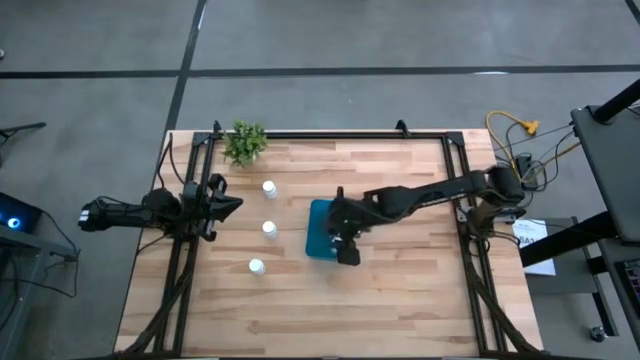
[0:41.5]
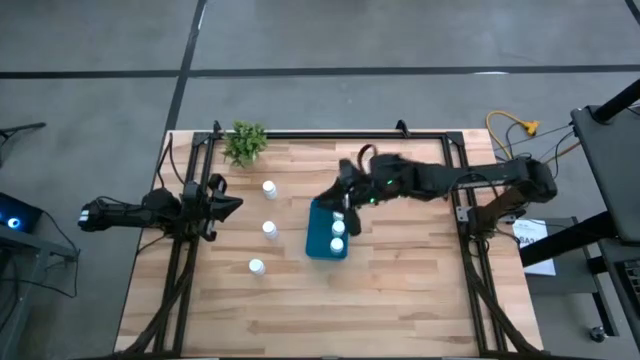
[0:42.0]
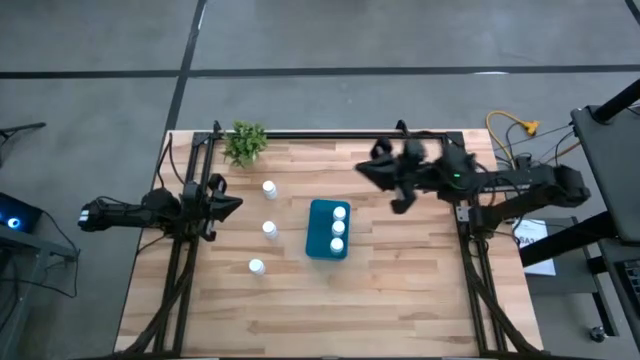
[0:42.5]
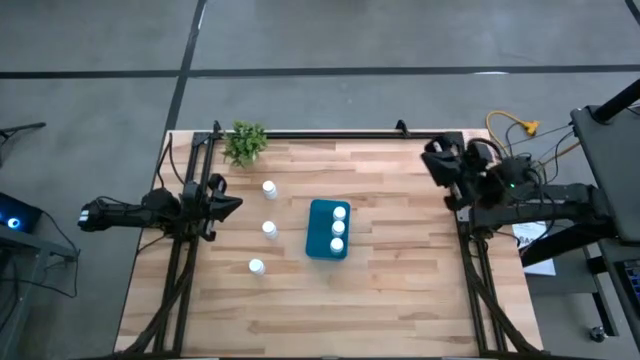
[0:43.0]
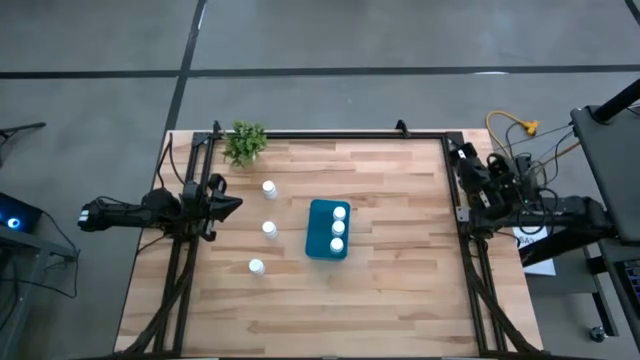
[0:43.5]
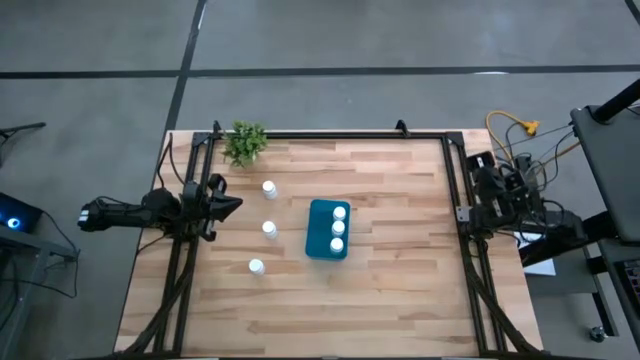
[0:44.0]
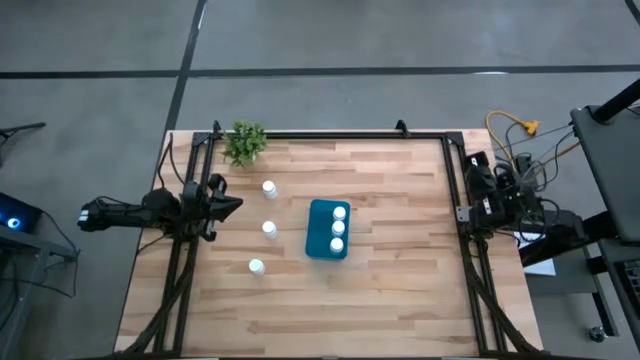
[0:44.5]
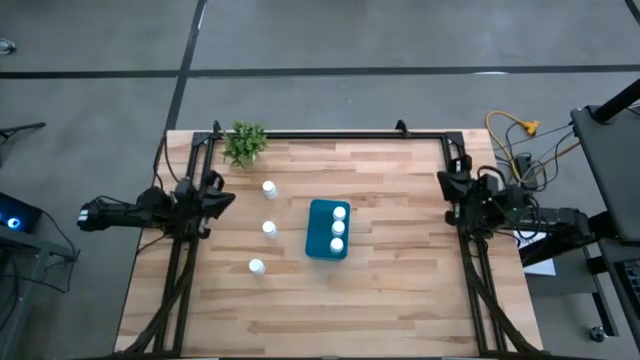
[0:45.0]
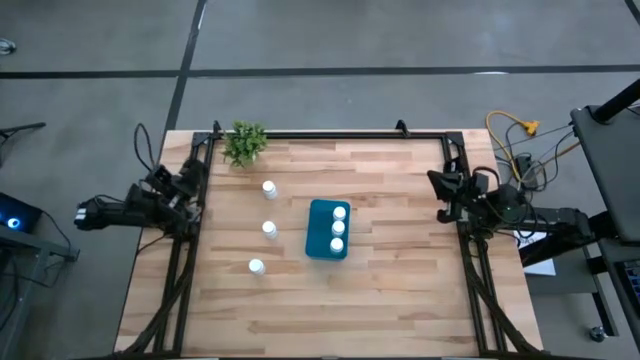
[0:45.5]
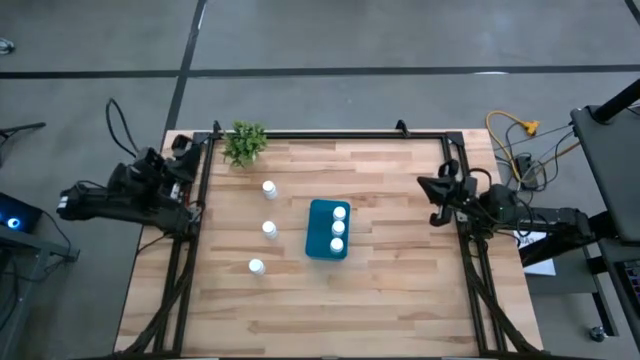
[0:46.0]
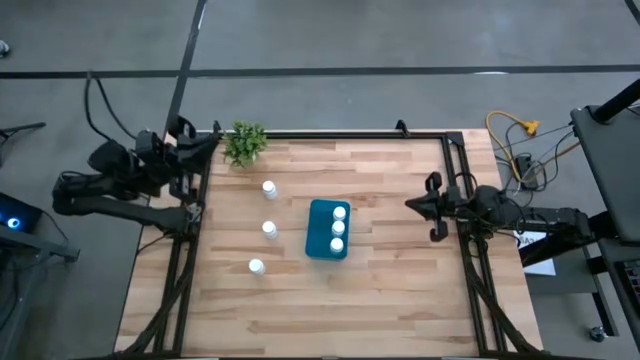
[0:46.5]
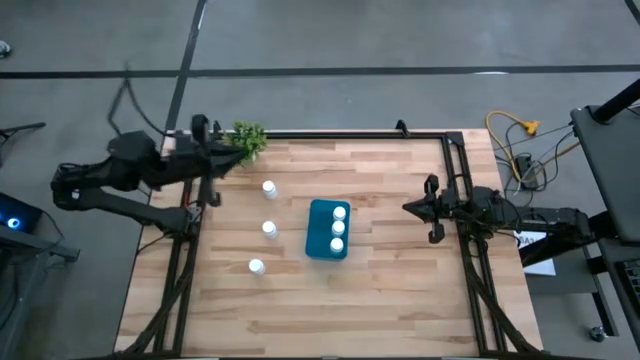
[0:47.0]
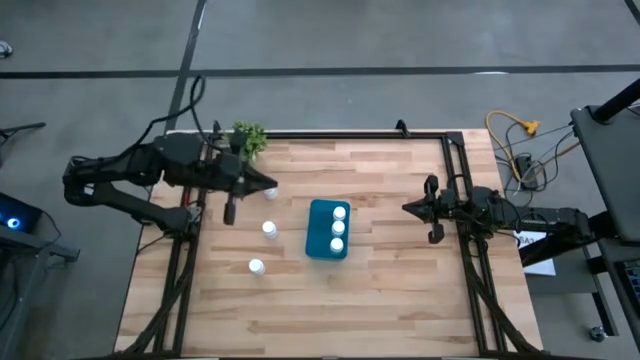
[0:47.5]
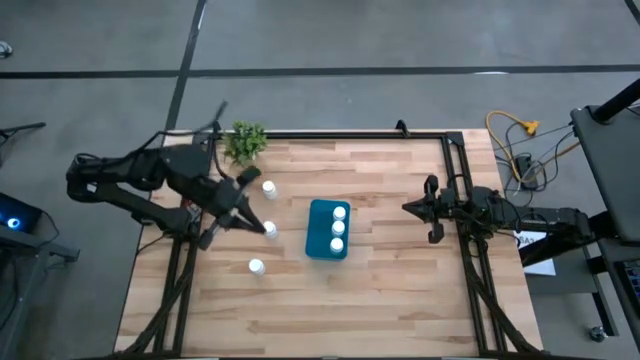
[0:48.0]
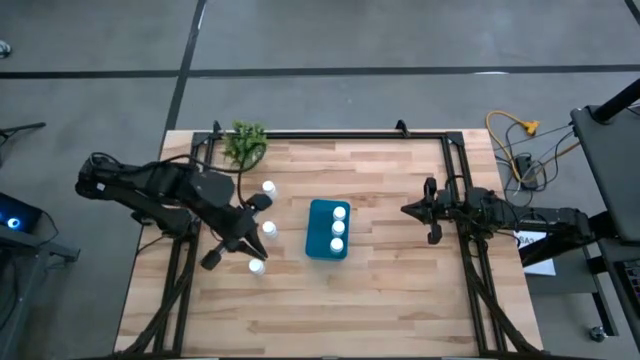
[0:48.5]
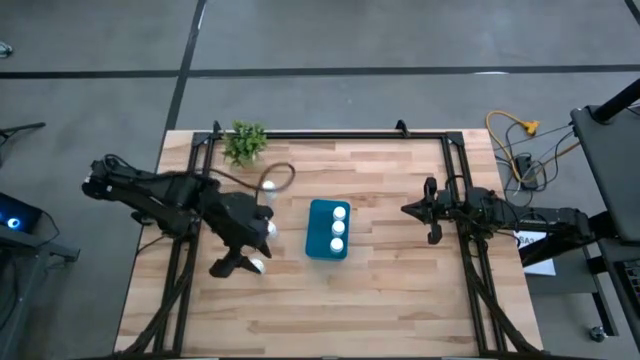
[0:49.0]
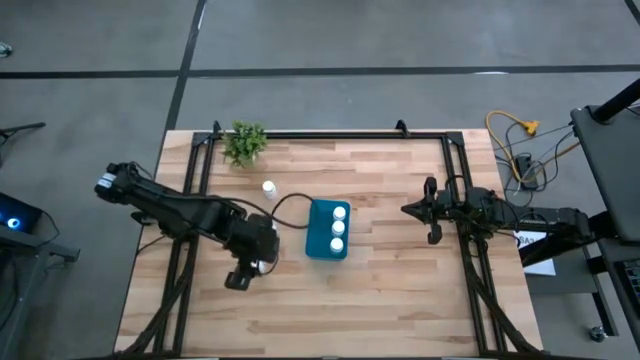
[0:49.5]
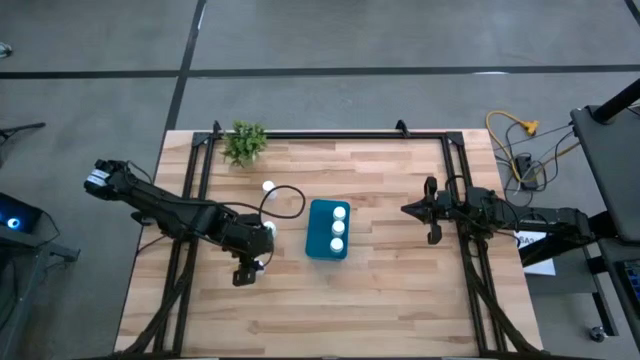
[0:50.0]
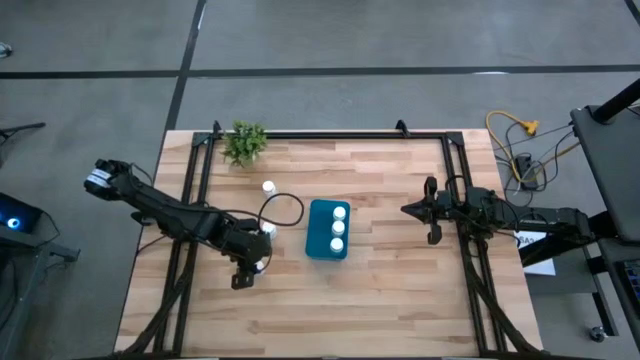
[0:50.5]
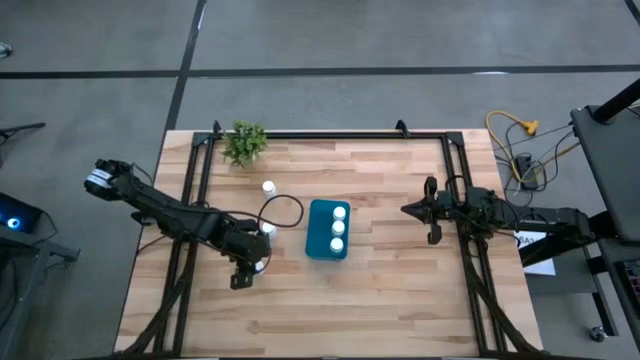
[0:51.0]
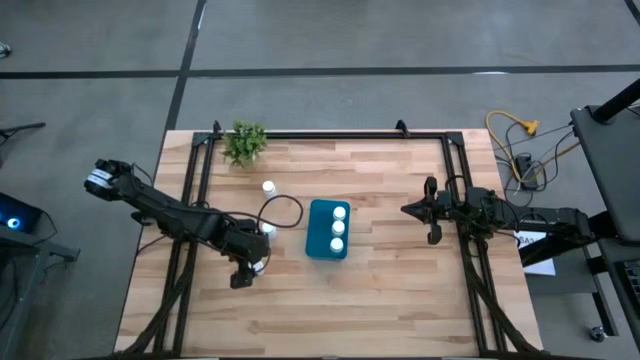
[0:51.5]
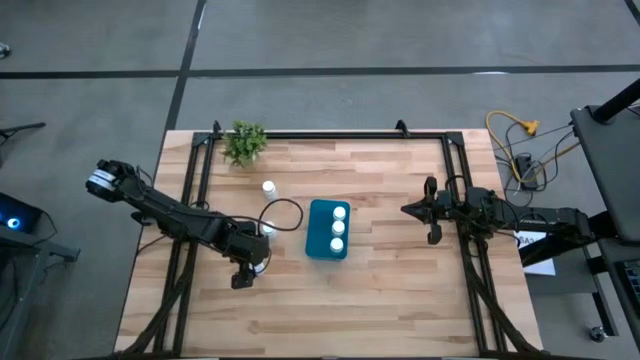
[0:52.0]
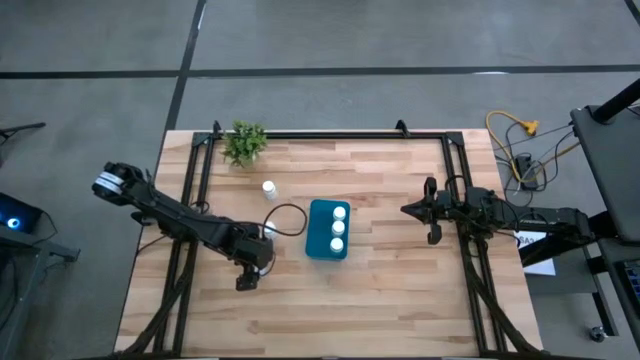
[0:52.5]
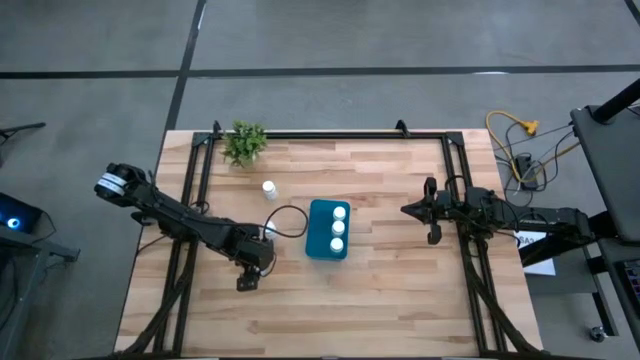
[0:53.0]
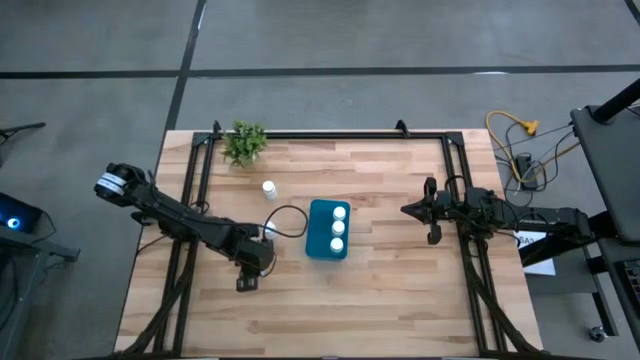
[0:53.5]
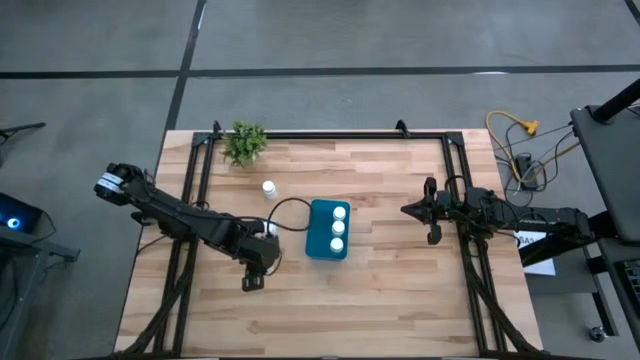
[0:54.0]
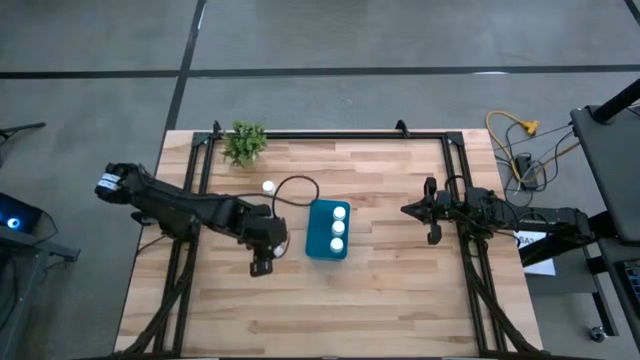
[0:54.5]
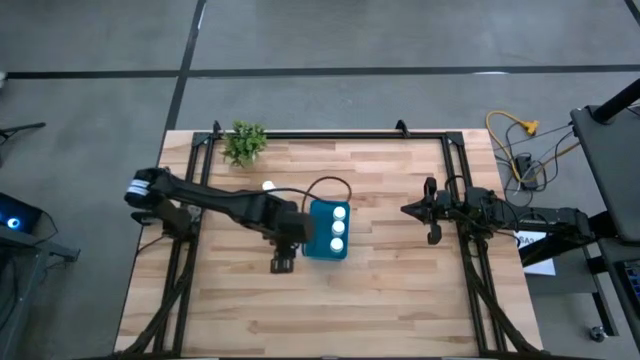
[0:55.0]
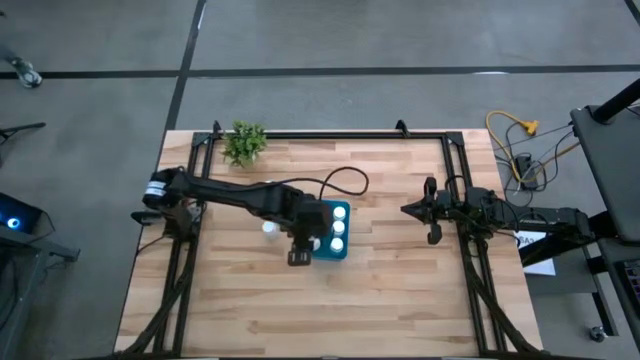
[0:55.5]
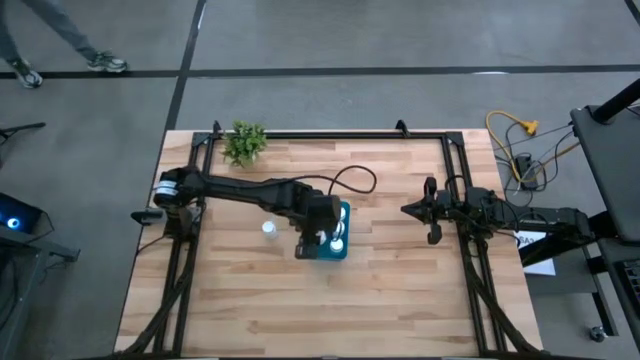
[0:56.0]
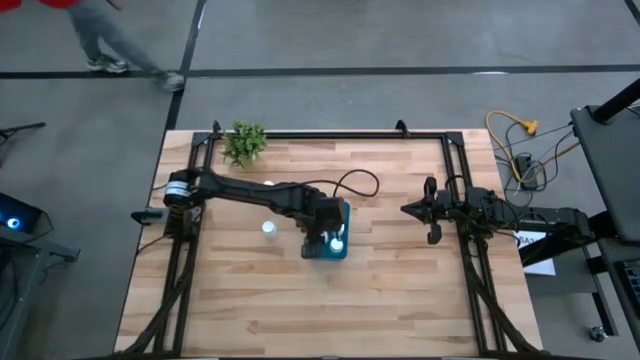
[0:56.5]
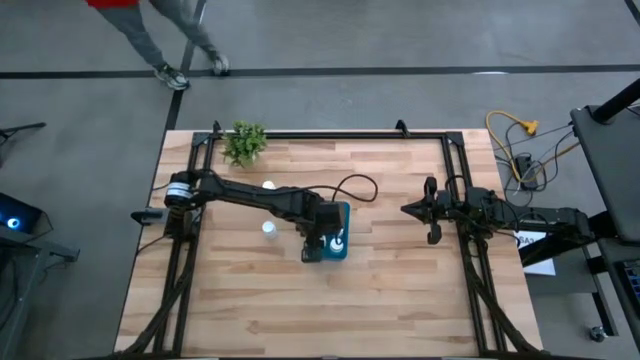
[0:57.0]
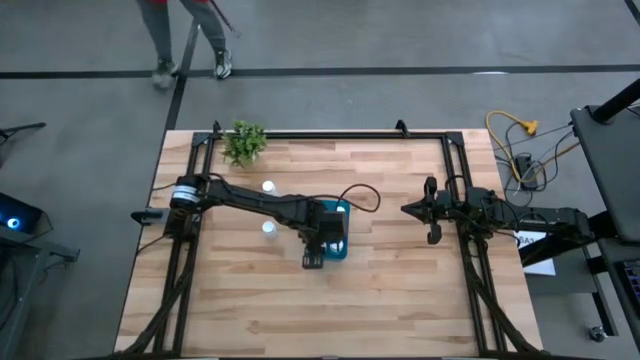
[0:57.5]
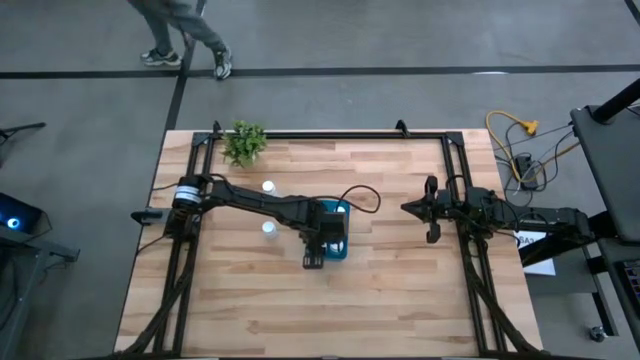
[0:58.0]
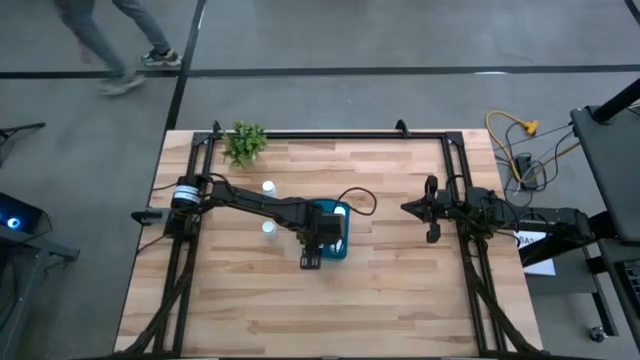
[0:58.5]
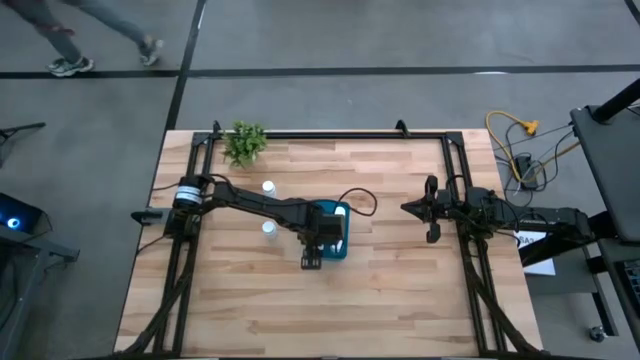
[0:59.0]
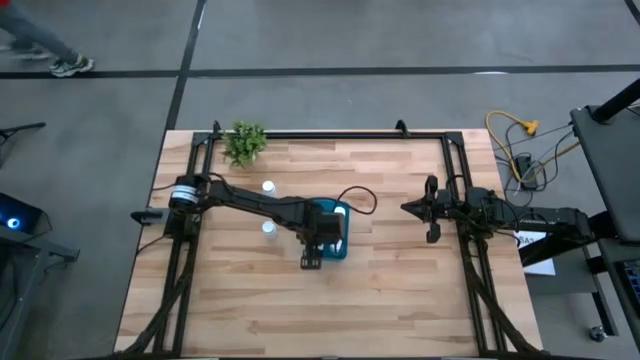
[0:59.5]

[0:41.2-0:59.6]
Task: Pick and place pill bottles into a basket
Put the white pill bottle into the blue container

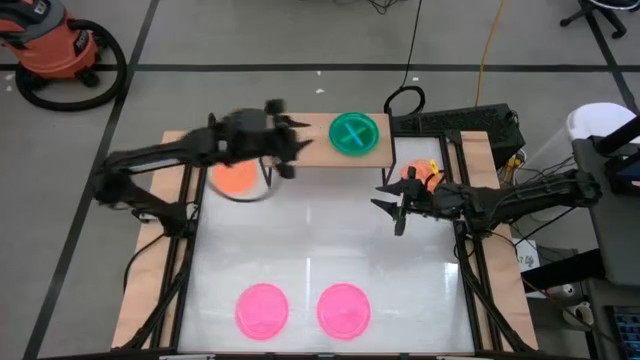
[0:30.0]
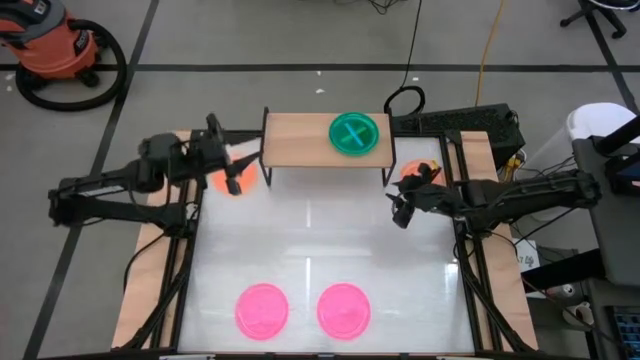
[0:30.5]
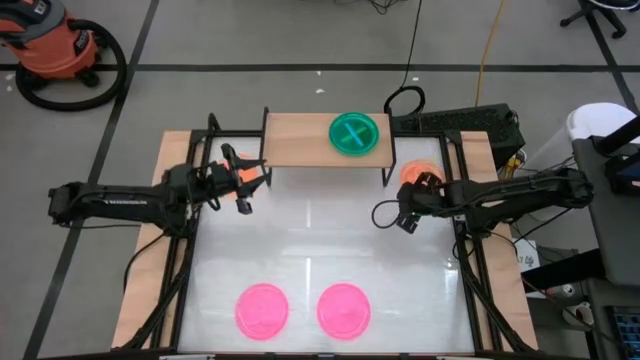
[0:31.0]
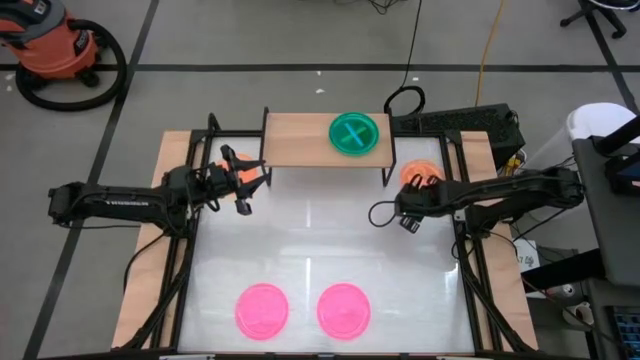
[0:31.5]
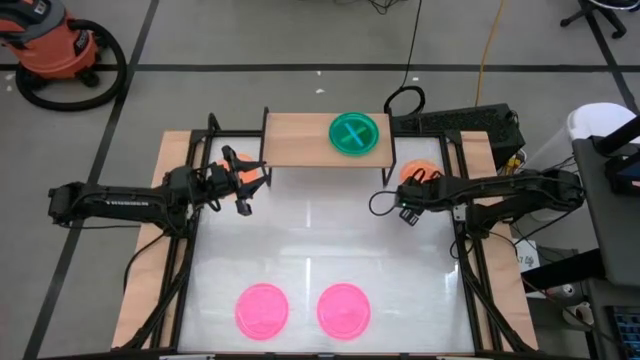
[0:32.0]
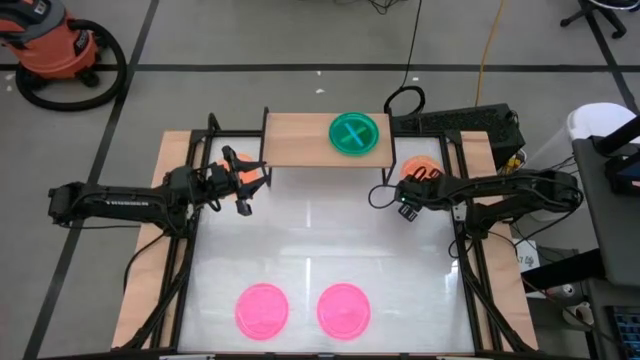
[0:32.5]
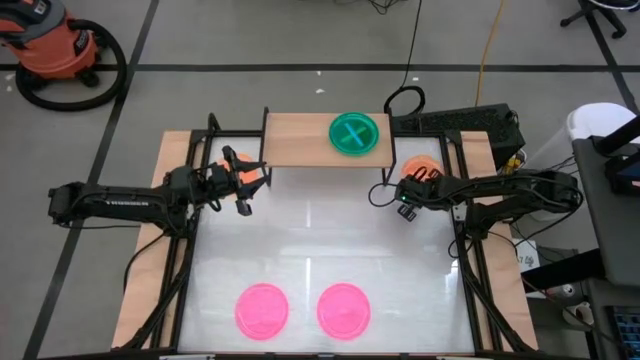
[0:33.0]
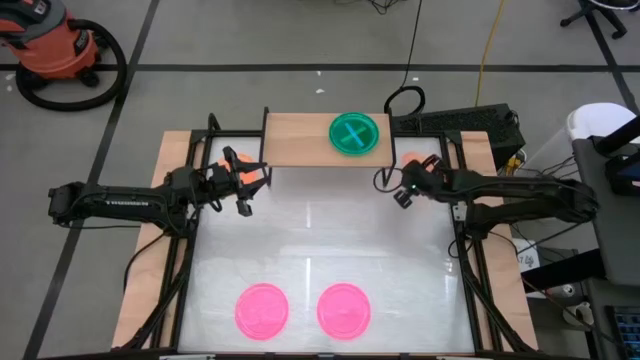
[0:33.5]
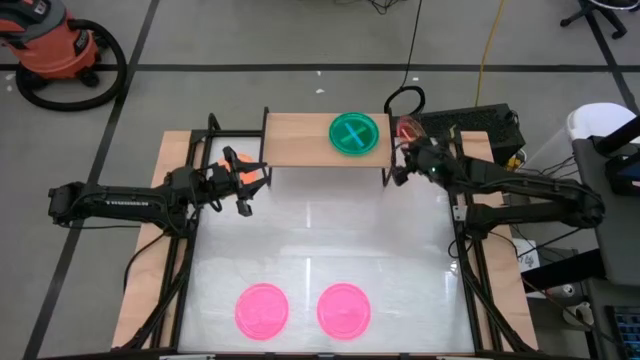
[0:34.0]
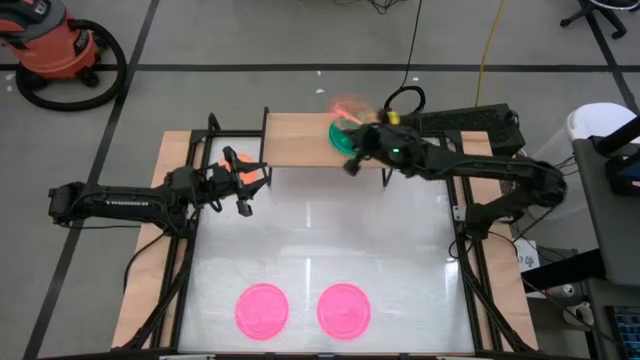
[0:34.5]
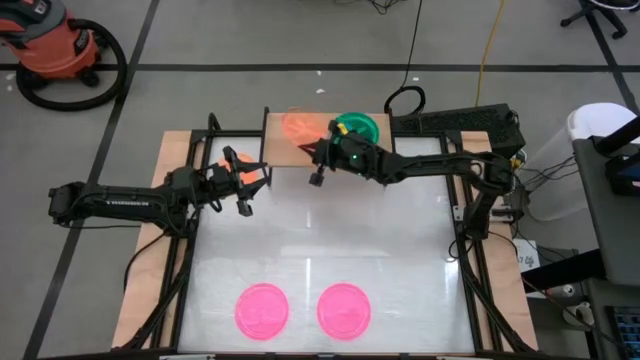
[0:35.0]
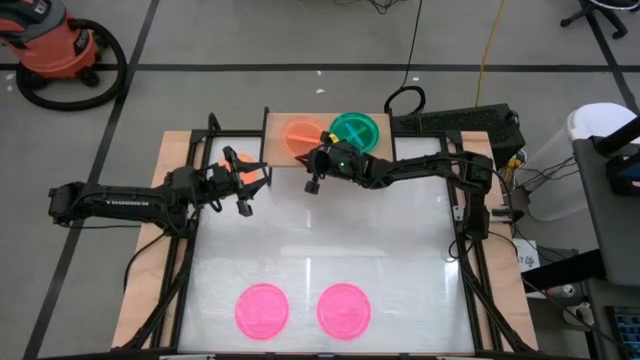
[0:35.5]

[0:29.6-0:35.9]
Task: Place and stack plates onto a shelf
Put the right orange transparent plate on the shelf
